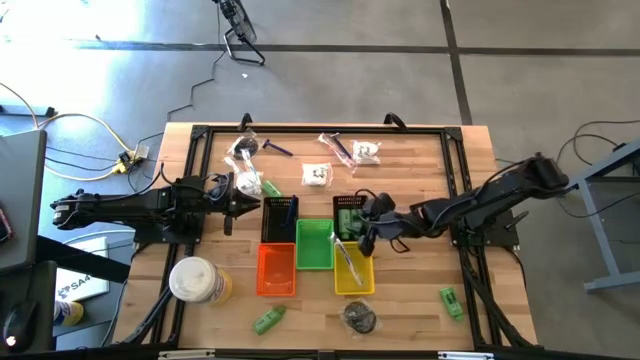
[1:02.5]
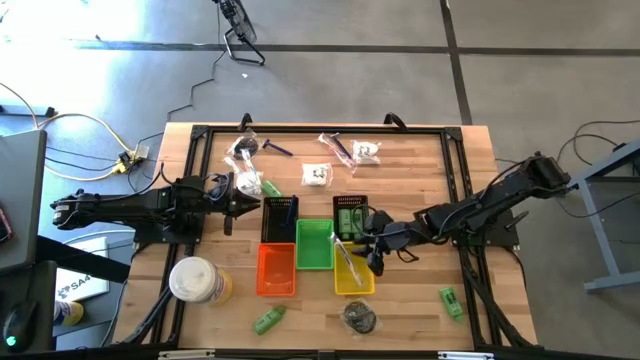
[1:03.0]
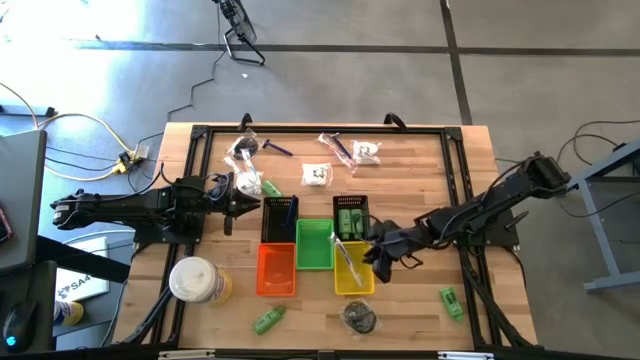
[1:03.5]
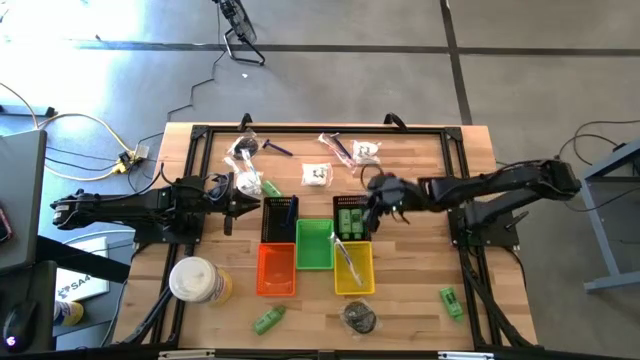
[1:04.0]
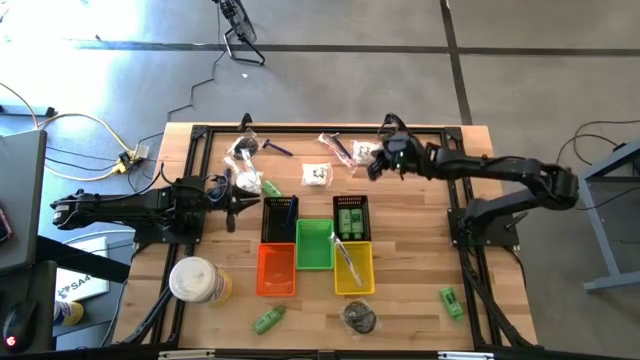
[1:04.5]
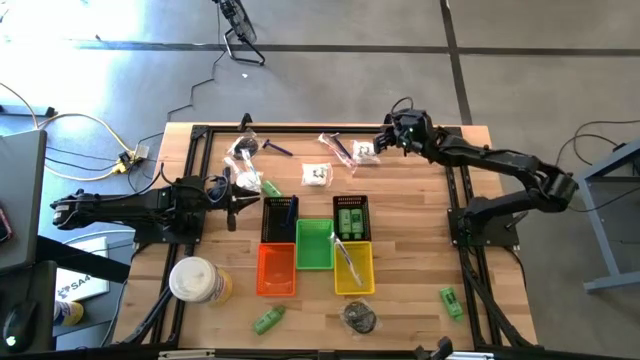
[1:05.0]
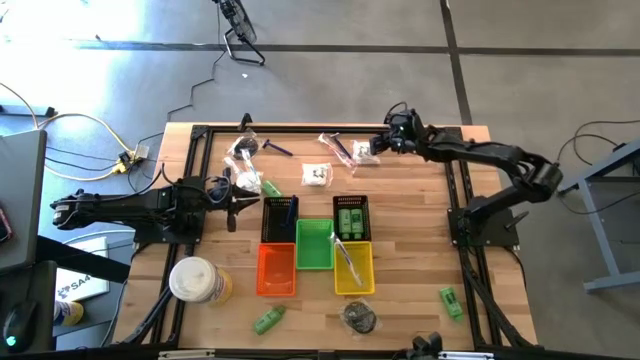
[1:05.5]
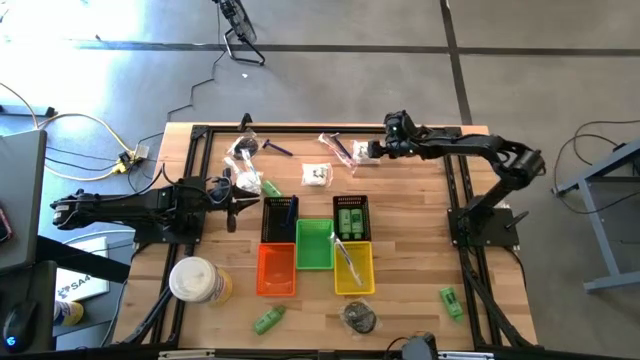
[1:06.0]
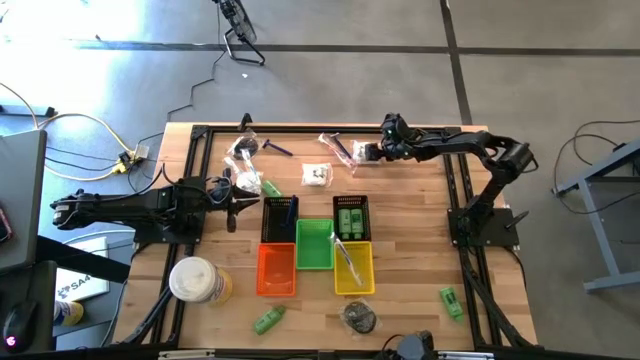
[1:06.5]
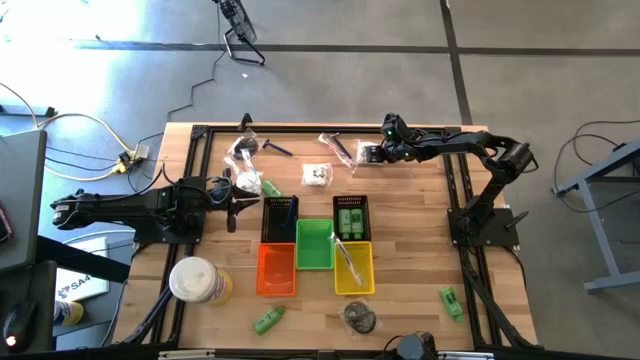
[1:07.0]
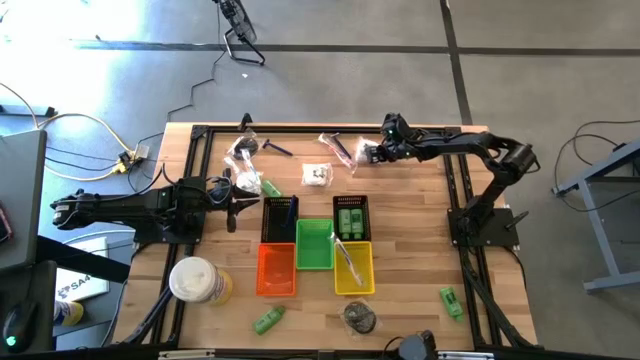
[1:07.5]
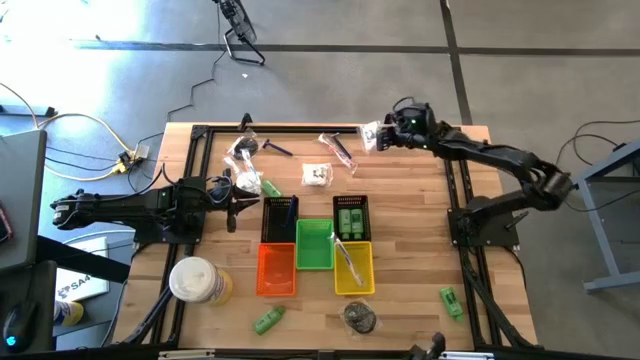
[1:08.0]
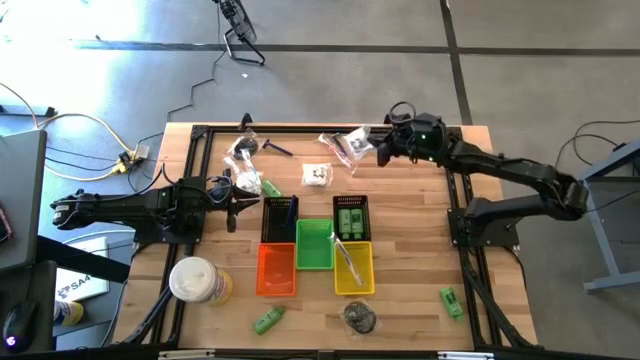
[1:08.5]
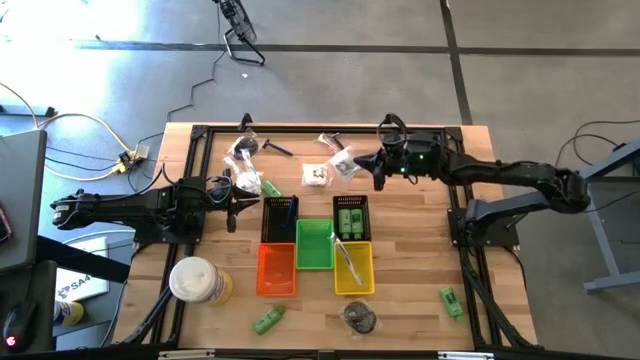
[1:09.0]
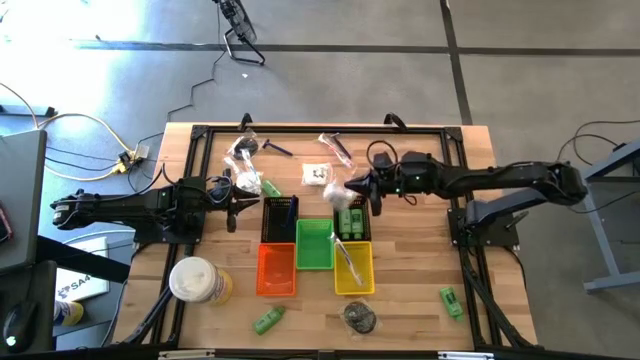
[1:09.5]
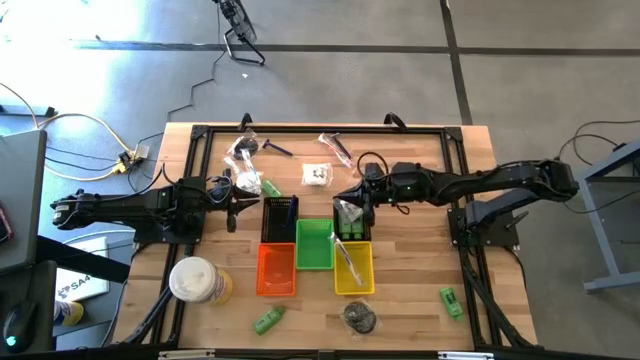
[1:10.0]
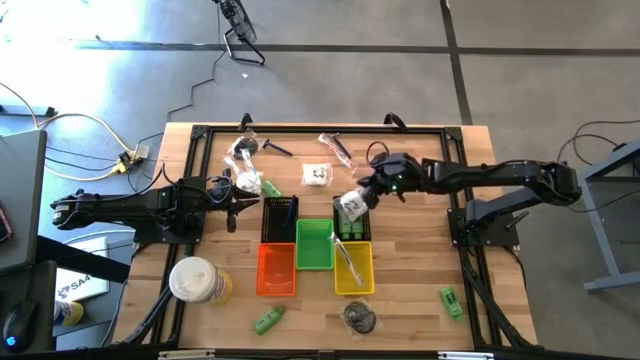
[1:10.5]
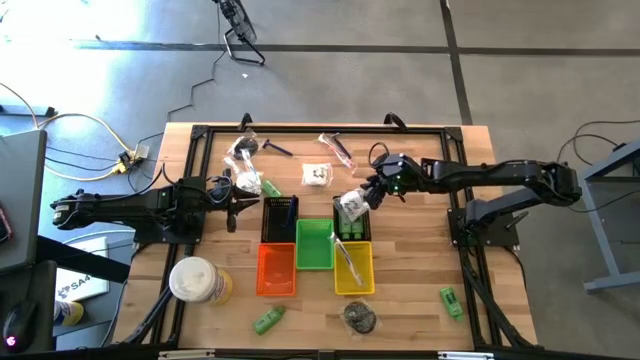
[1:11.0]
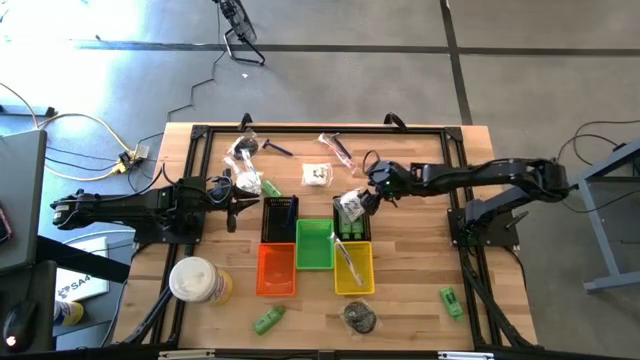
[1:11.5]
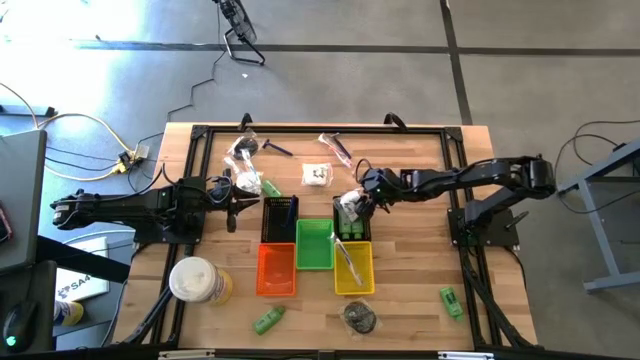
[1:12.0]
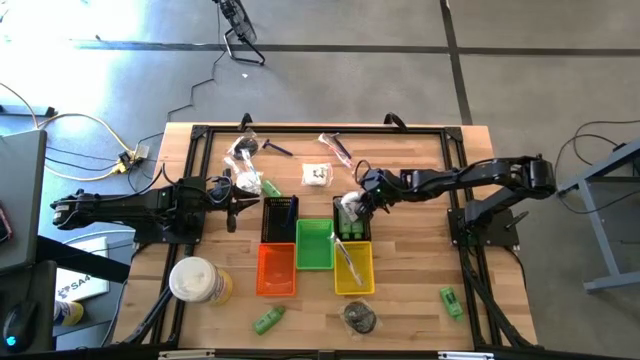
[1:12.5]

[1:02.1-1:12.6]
Task: Pick & Place Travel size toiletries
Put the right white vanity pack into the orange bin

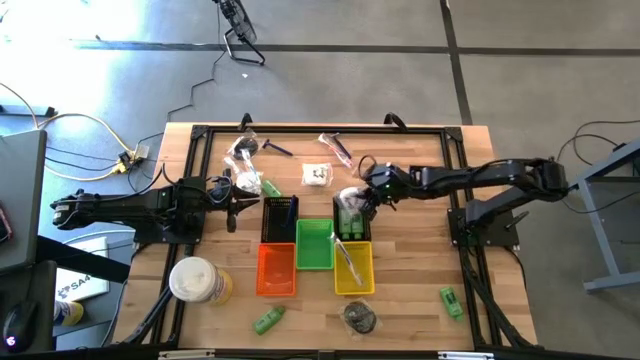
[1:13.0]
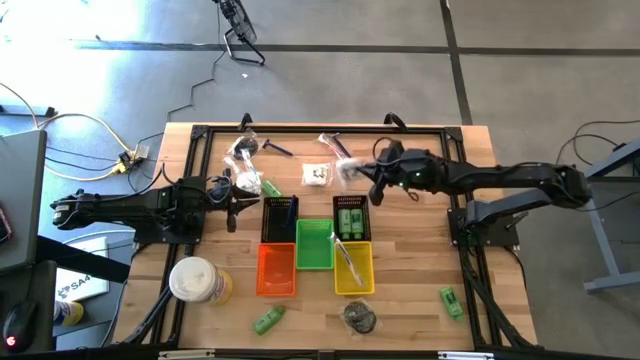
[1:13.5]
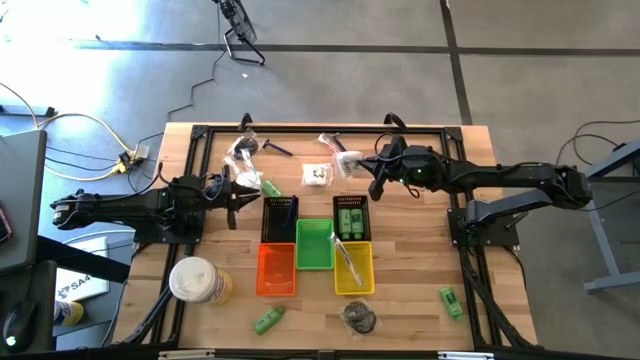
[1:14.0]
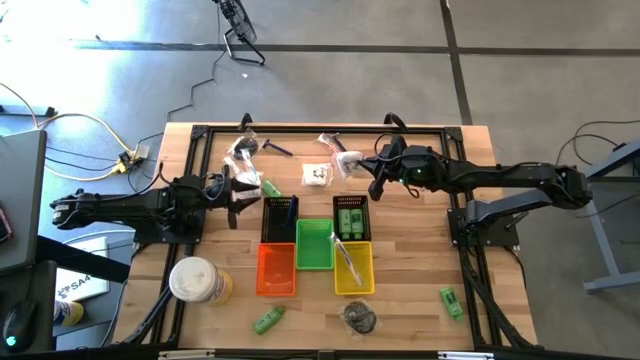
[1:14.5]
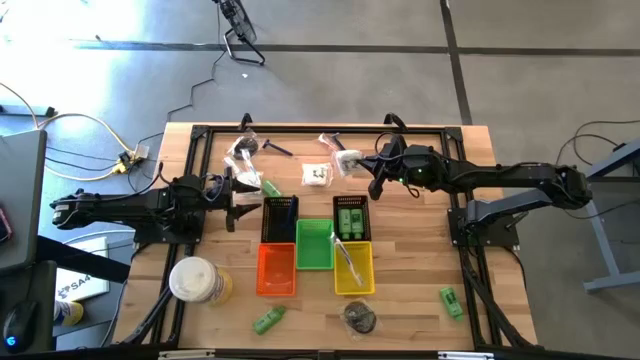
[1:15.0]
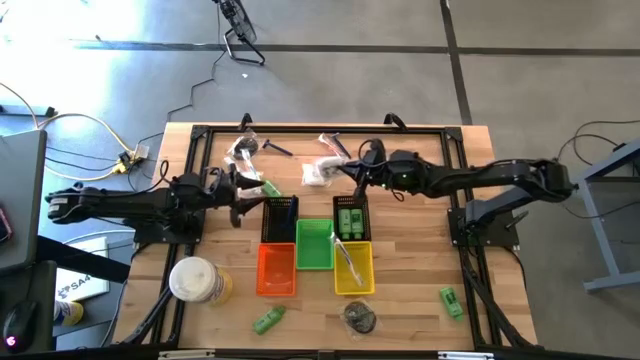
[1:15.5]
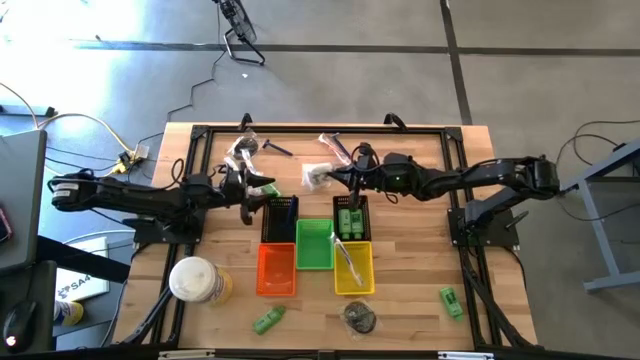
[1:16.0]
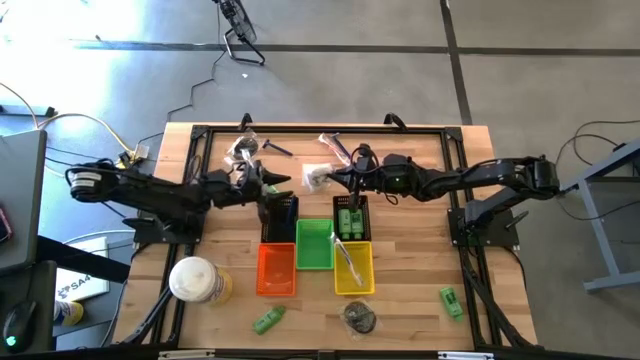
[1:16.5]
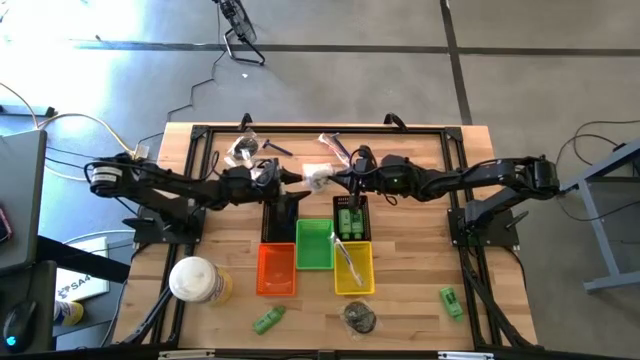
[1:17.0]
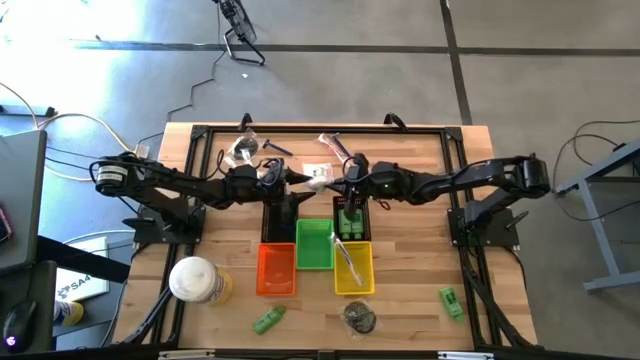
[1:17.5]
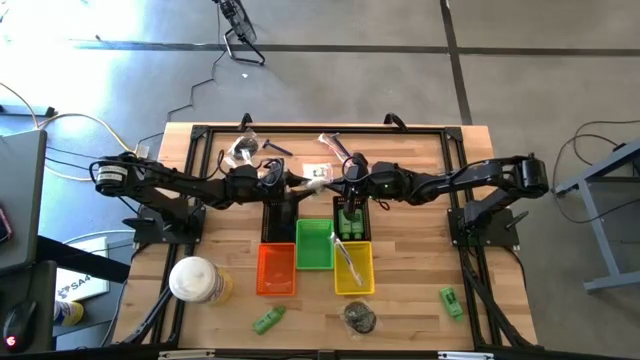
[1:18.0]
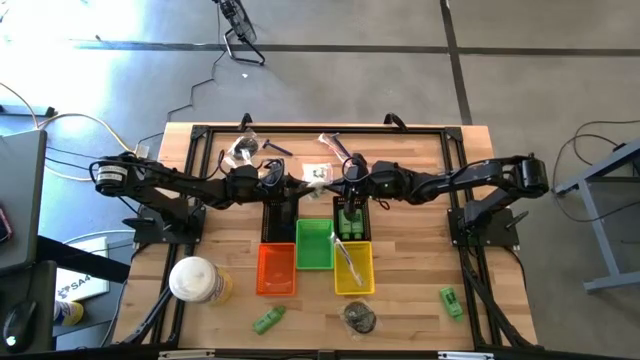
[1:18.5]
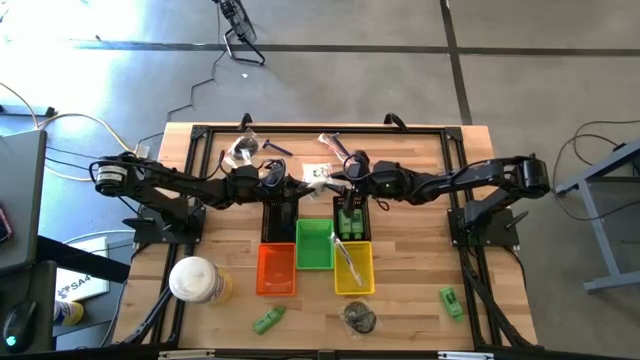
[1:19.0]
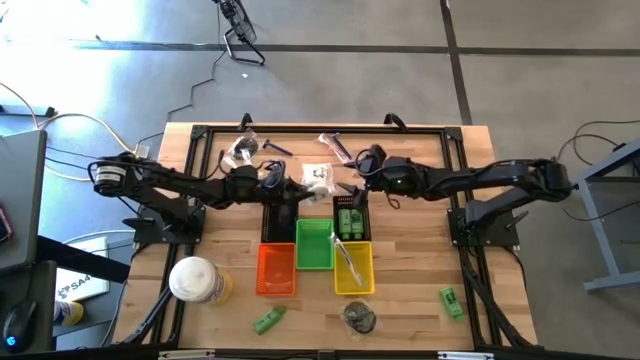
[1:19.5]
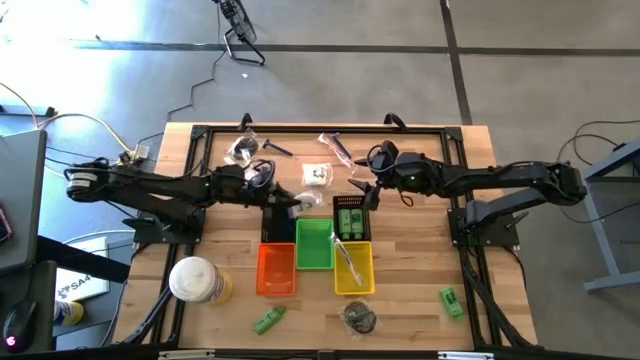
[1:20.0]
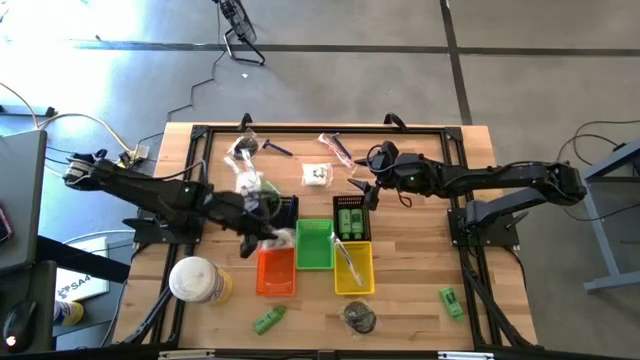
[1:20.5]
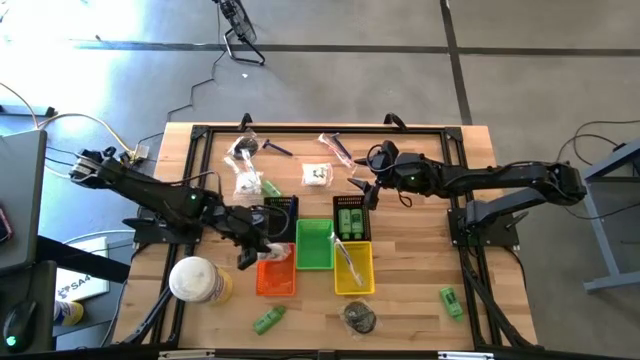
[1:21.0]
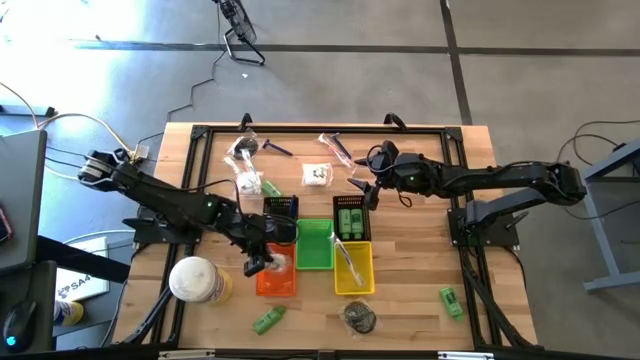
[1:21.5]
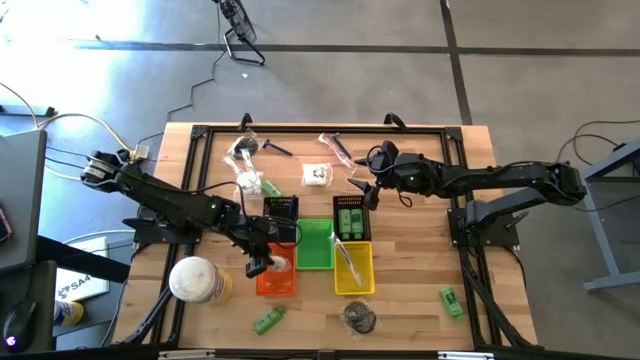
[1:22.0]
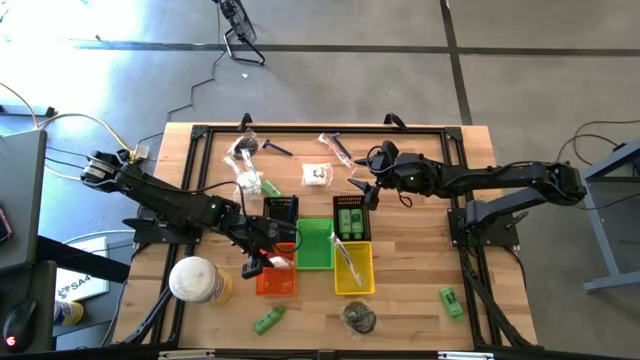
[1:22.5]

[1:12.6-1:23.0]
Put the right white vanity pack into the orange bin
